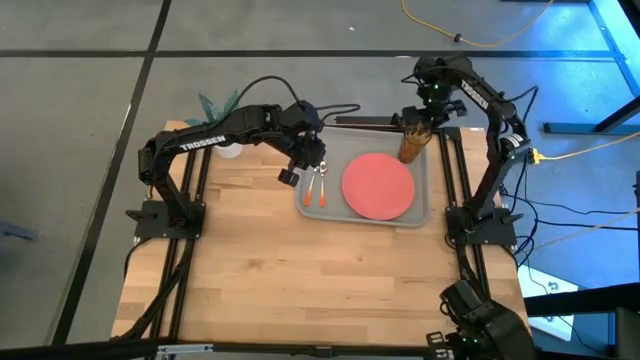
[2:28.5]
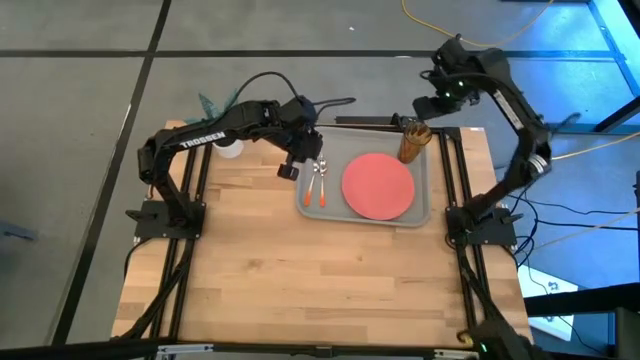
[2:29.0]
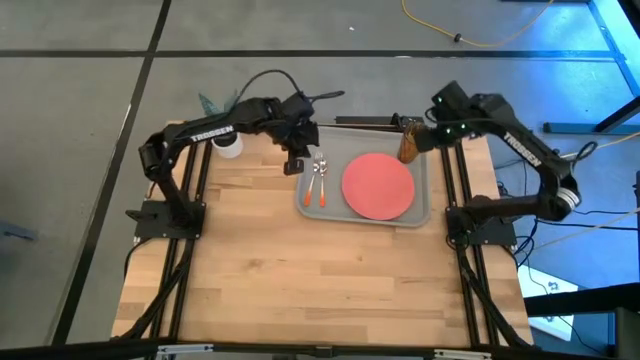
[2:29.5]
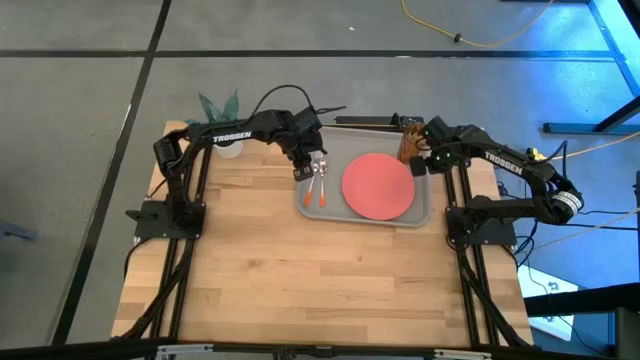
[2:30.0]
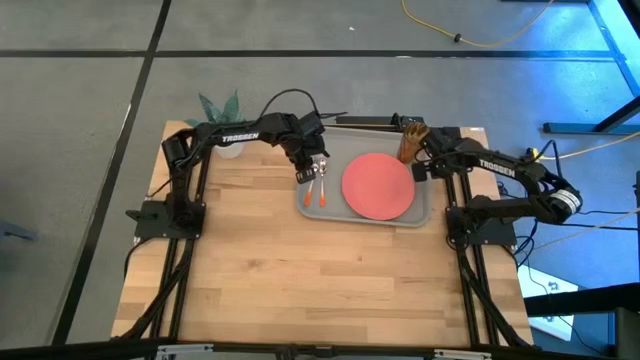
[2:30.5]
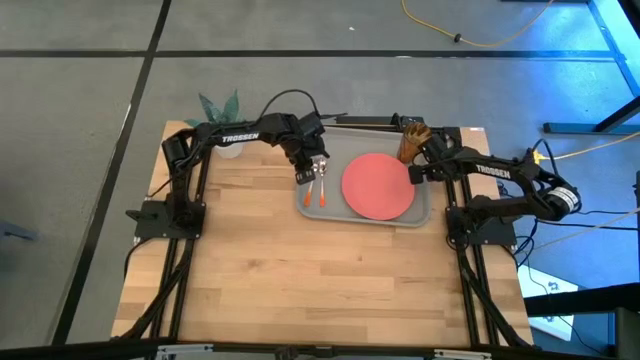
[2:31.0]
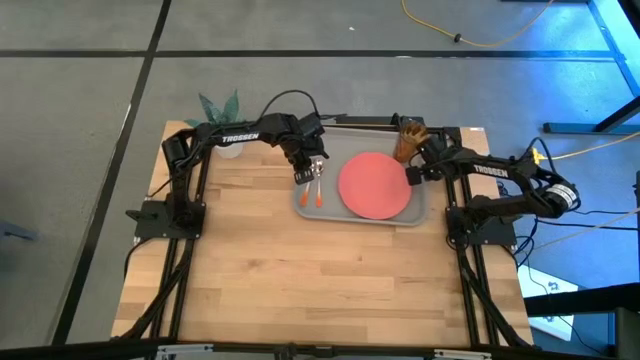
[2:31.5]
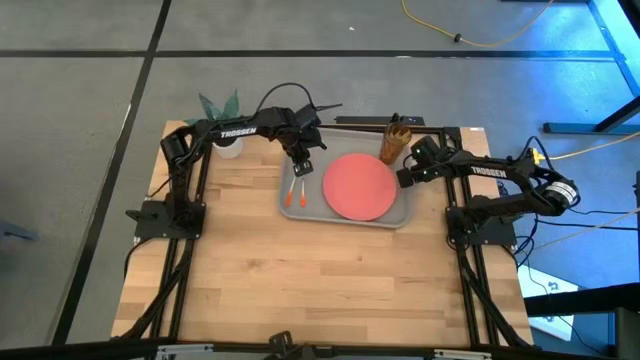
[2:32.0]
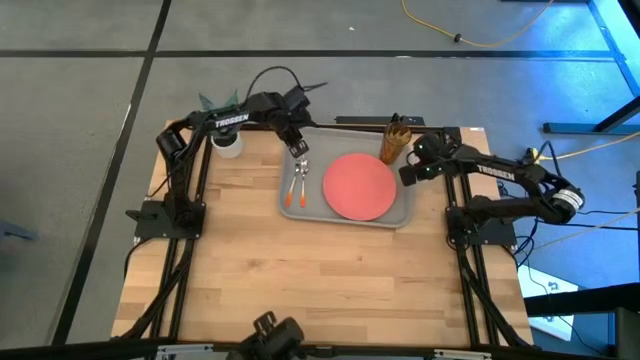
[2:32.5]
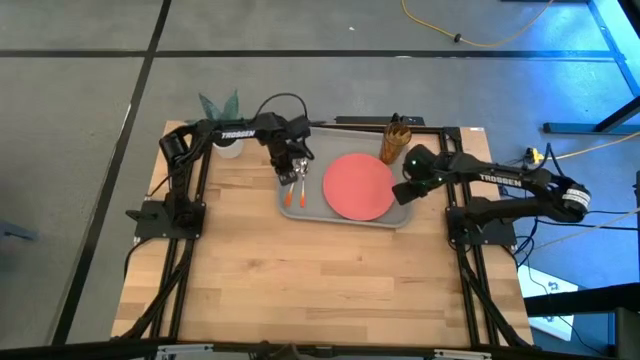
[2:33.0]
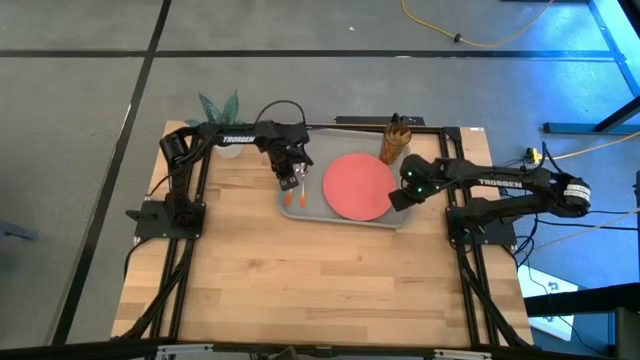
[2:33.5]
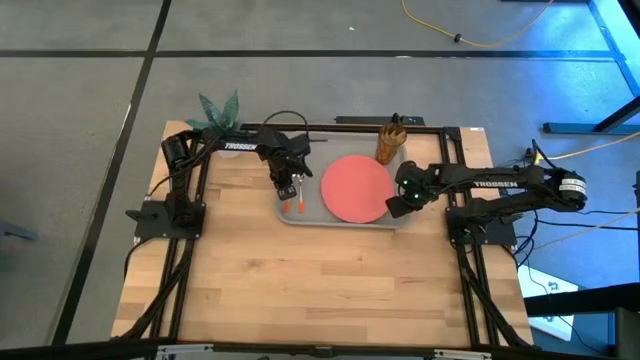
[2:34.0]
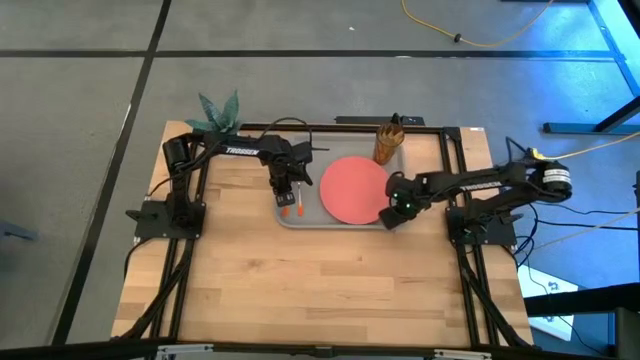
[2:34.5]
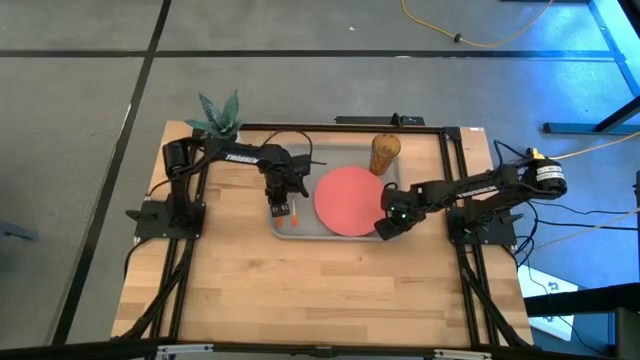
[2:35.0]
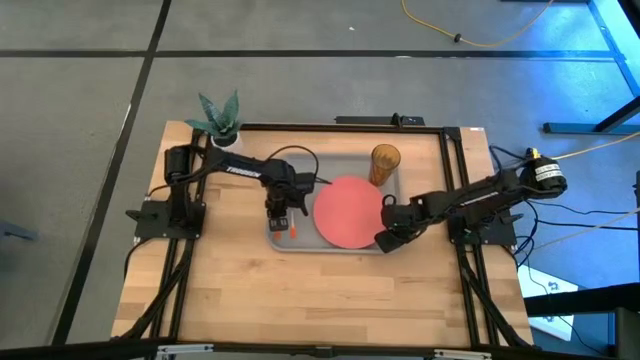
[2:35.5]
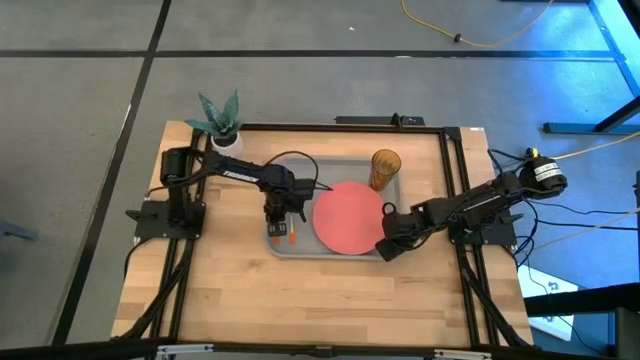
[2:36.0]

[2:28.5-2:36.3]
Task: Pick and place plate/cup/fork/spoon on tray
Move the gray serving tray to the center of the table

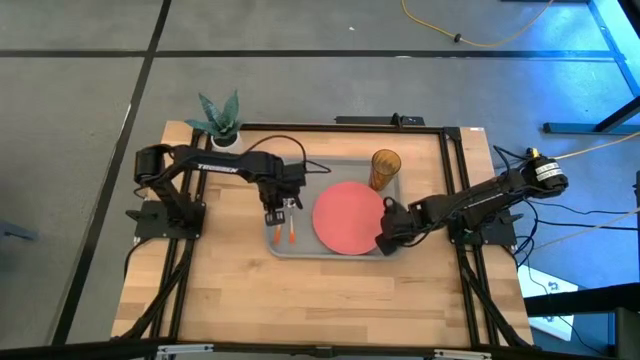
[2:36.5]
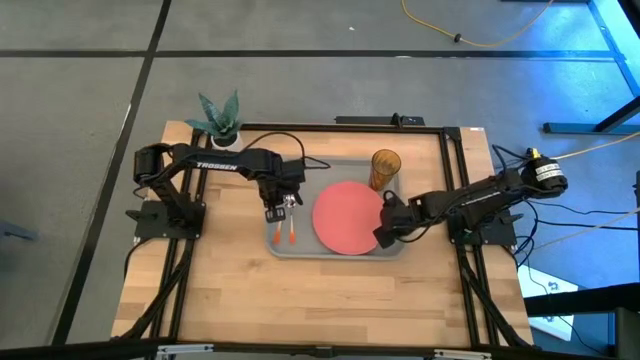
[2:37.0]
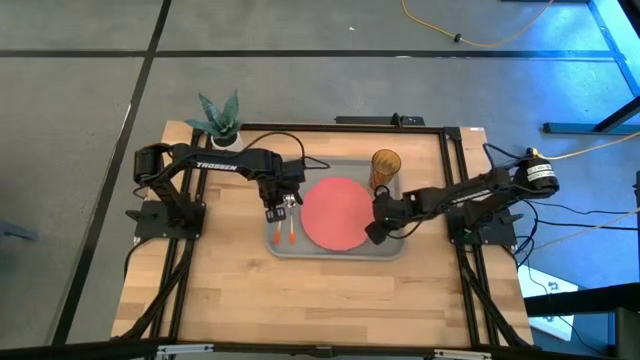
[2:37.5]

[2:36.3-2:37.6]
Adjust the pink plate on the gray serving tray

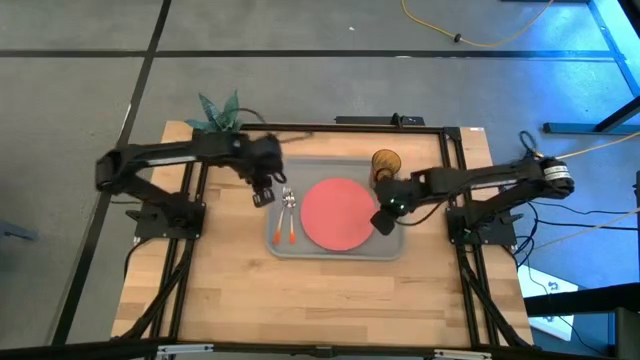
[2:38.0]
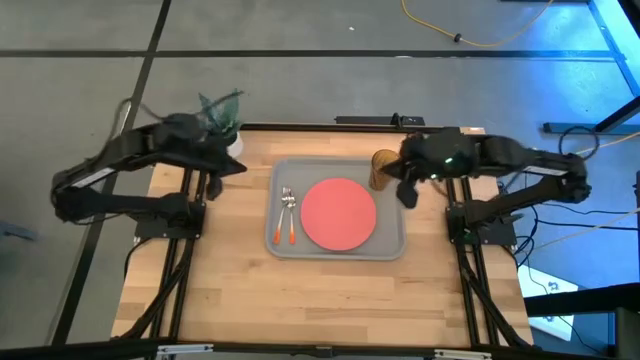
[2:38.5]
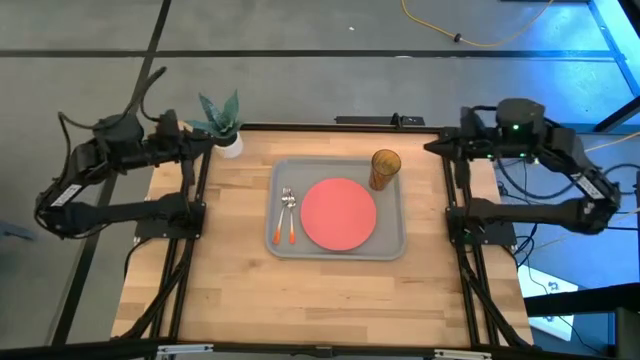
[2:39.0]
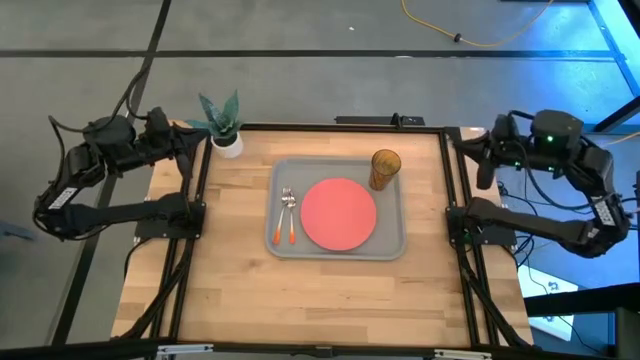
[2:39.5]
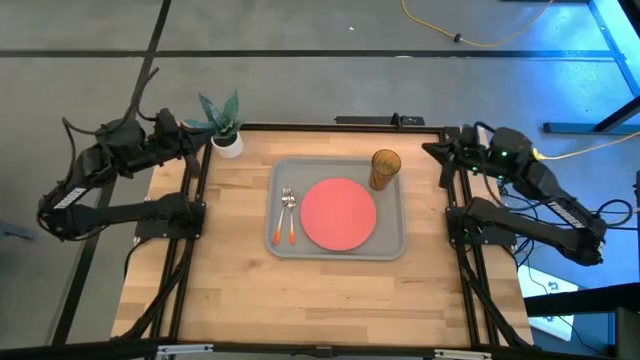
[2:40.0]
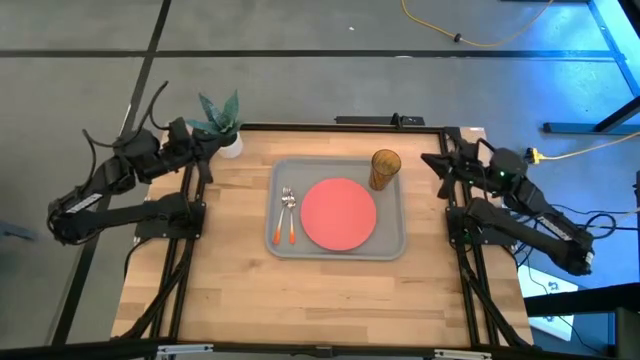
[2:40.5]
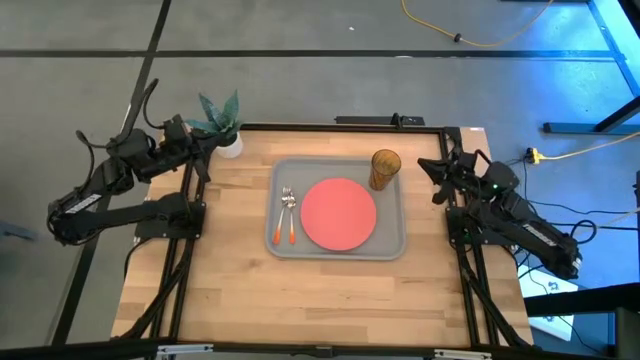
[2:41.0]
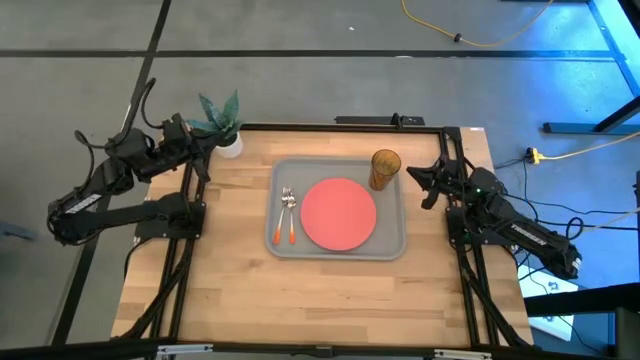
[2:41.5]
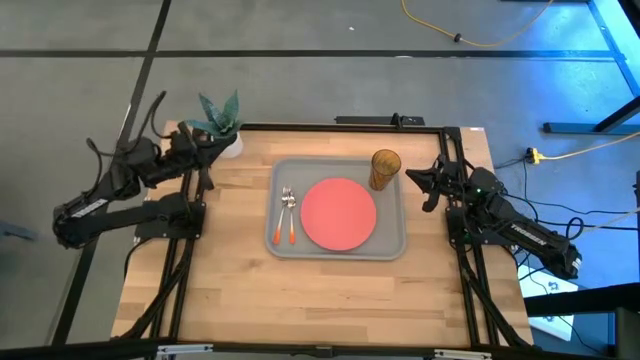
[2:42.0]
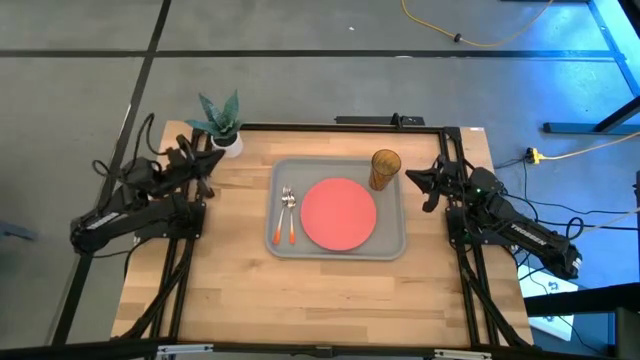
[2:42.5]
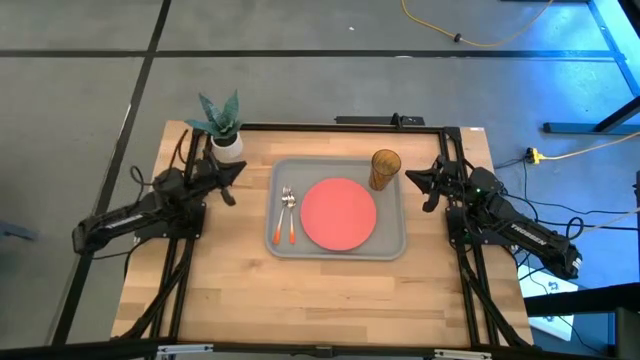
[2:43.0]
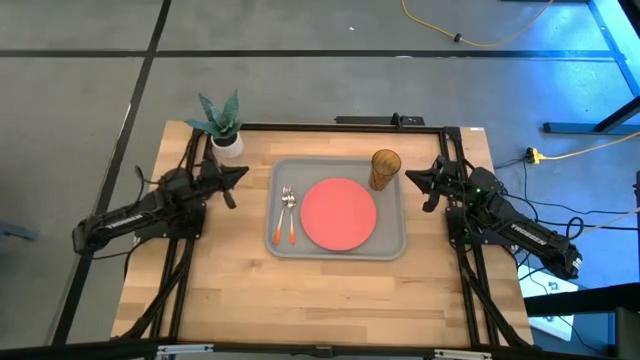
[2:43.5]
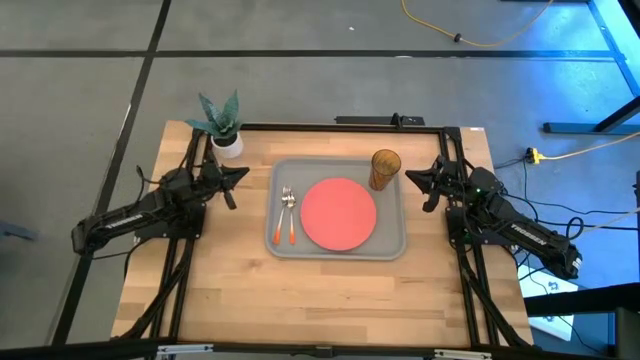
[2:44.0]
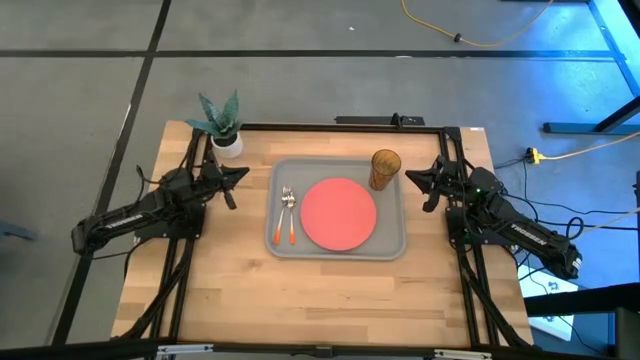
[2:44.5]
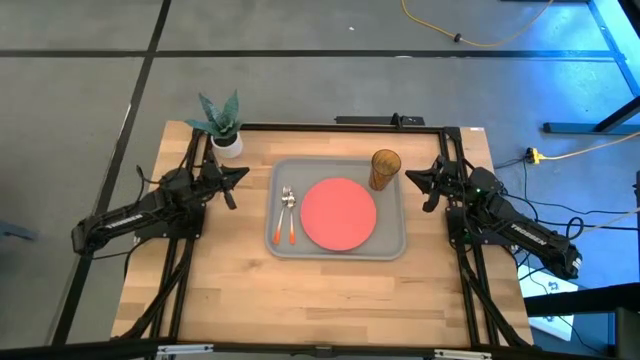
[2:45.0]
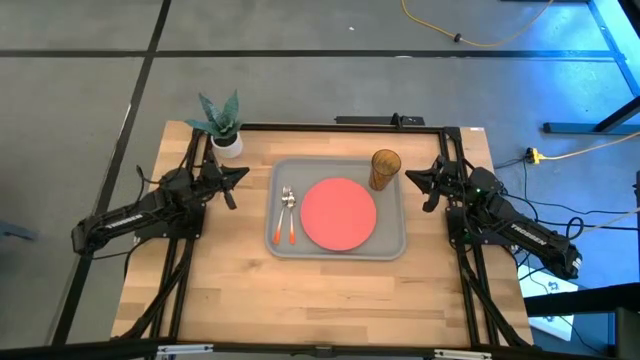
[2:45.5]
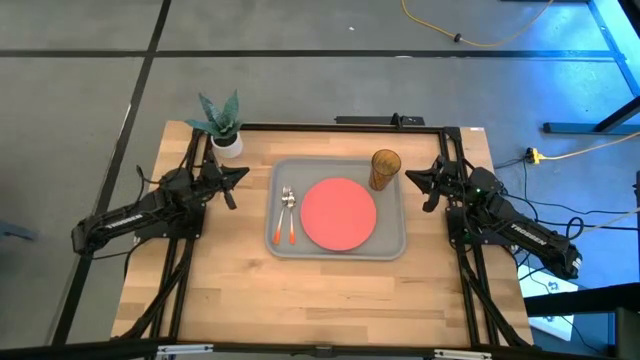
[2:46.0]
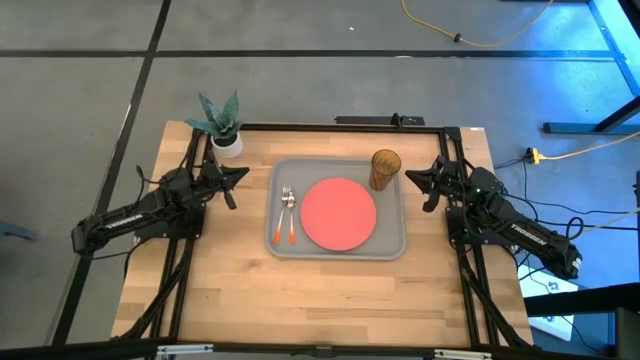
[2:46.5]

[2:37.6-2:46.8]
Return to Home Position

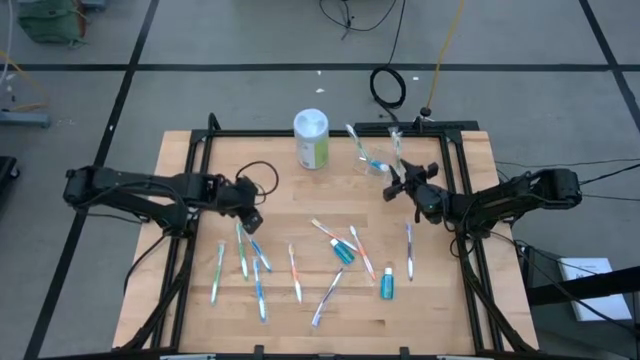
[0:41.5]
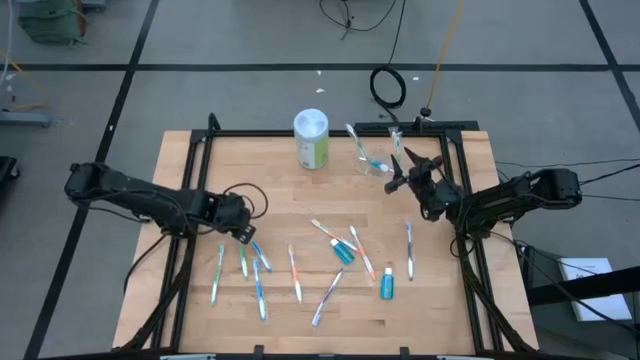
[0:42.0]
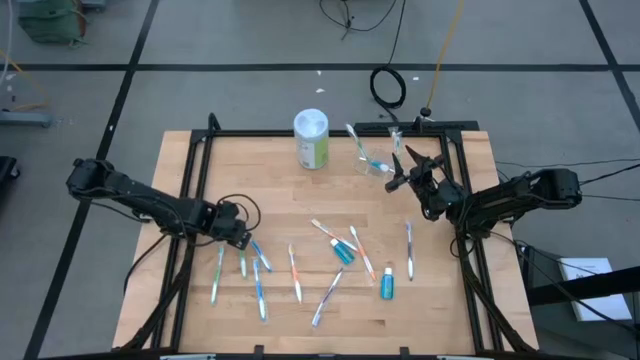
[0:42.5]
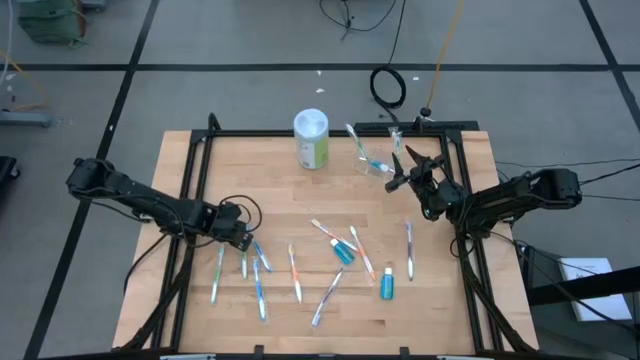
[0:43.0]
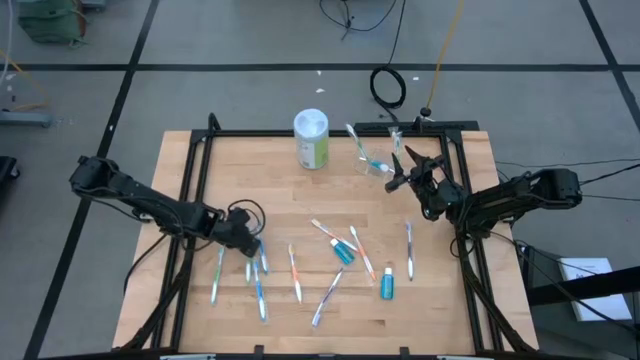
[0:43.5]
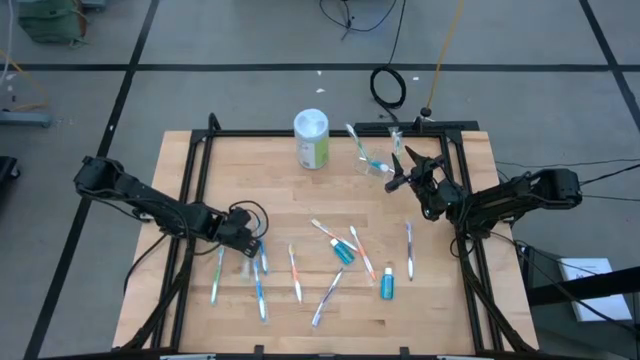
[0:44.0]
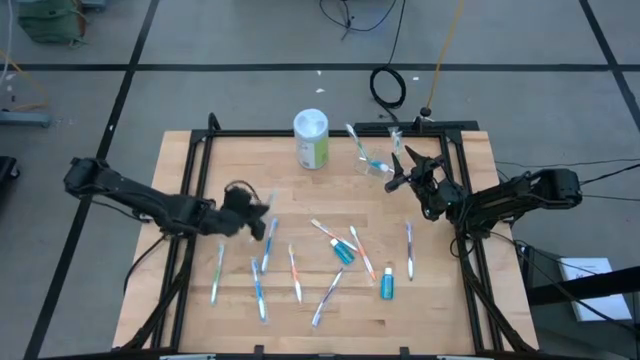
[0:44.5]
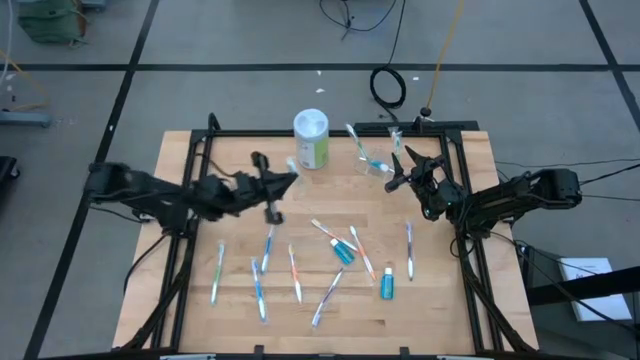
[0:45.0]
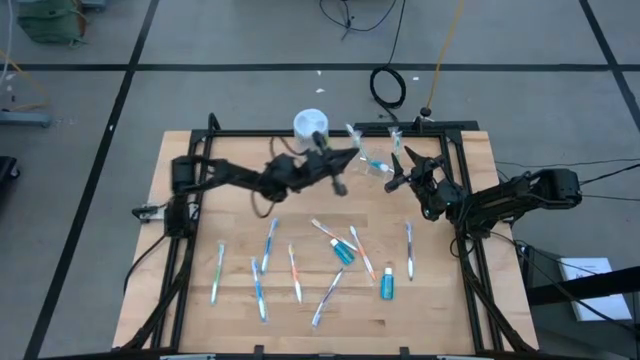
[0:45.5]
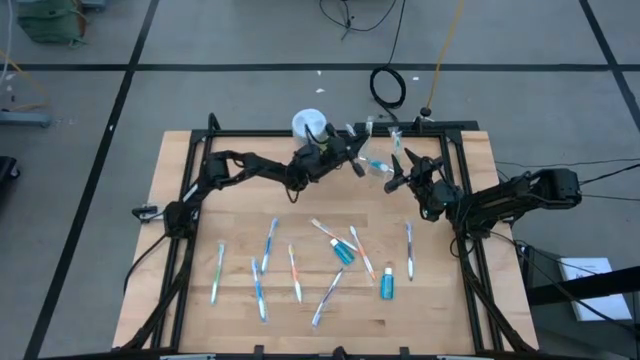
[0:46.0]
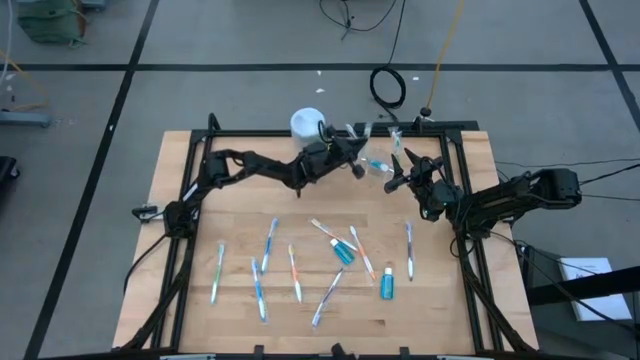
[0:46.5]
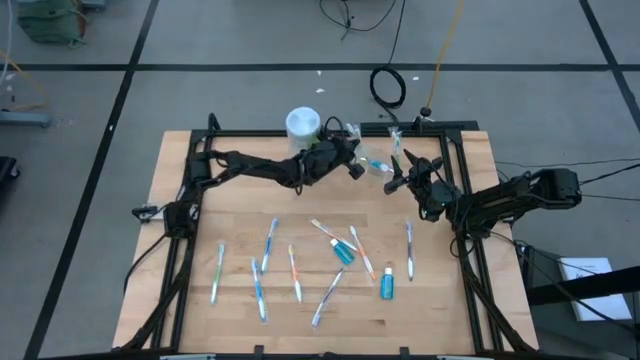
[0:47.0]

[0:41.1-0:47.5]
Task: Pick & Place toothbrushing station
Put the green toothbrush into the transparent organizer
